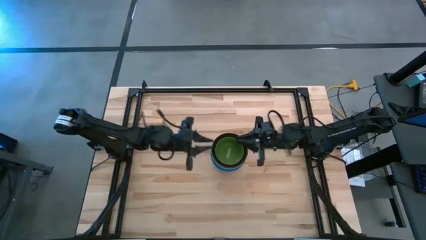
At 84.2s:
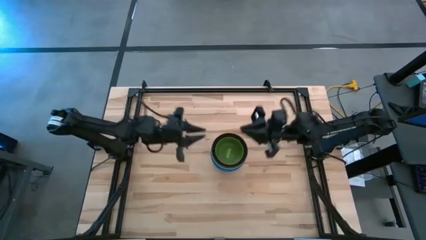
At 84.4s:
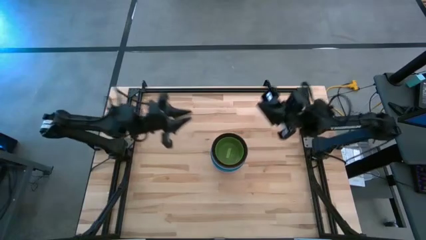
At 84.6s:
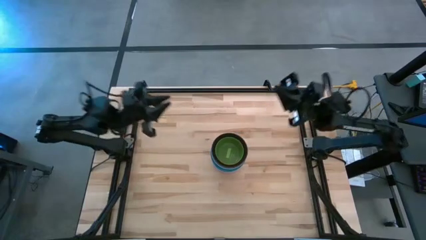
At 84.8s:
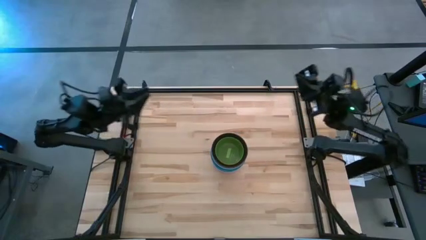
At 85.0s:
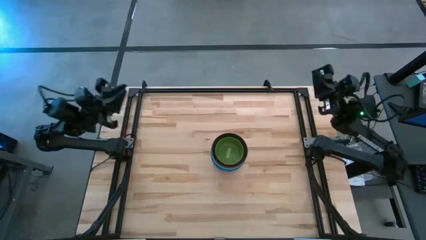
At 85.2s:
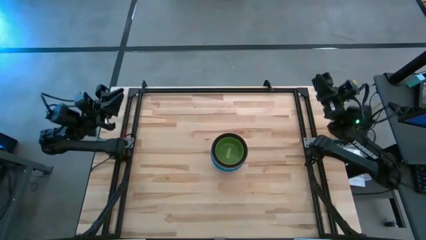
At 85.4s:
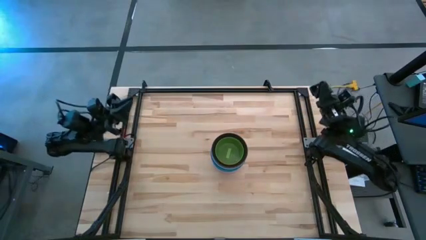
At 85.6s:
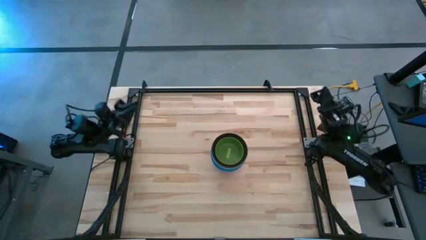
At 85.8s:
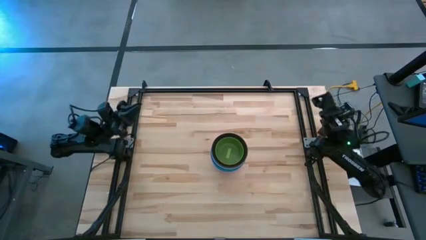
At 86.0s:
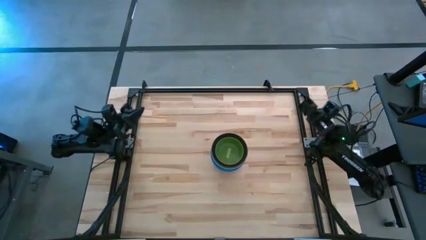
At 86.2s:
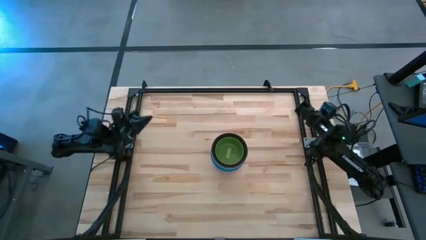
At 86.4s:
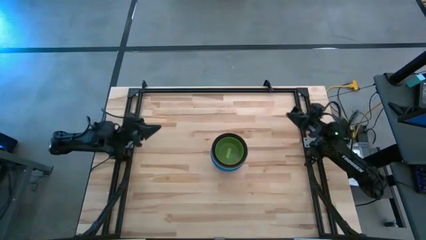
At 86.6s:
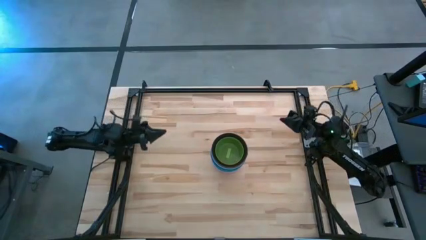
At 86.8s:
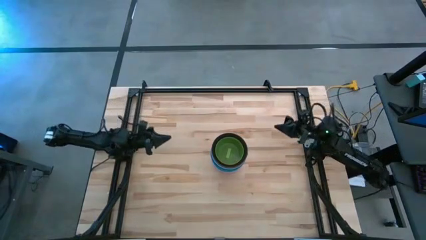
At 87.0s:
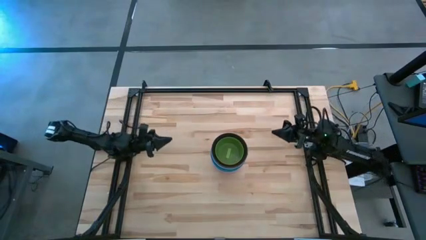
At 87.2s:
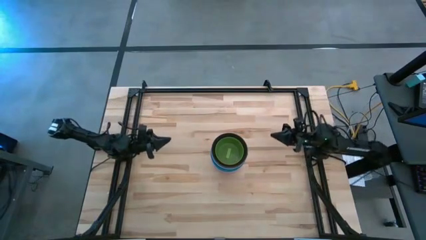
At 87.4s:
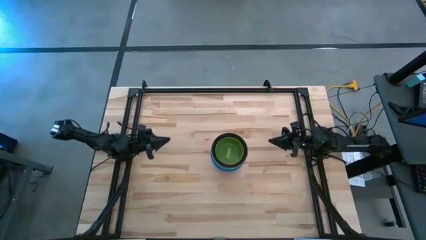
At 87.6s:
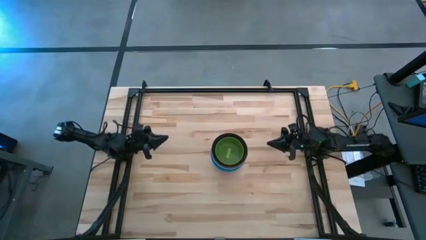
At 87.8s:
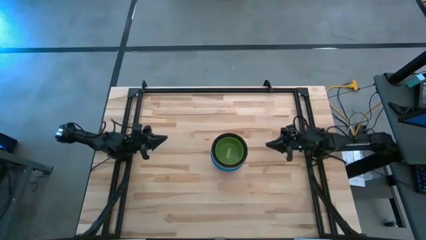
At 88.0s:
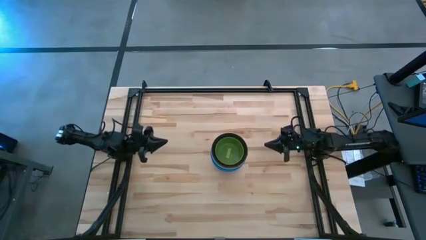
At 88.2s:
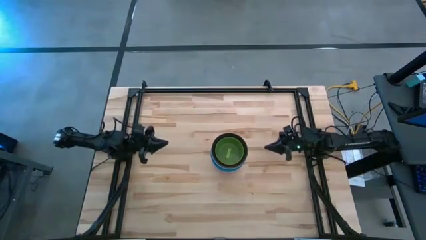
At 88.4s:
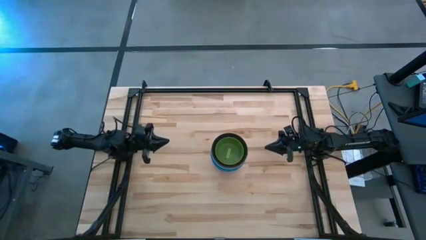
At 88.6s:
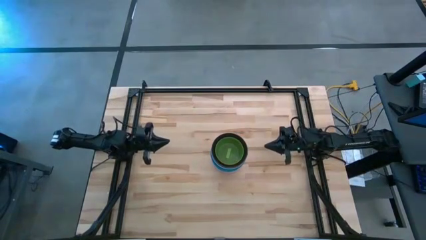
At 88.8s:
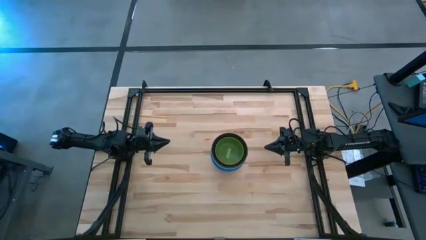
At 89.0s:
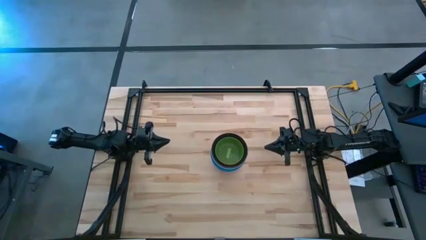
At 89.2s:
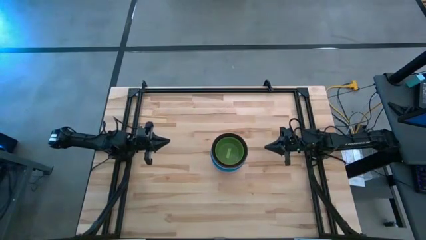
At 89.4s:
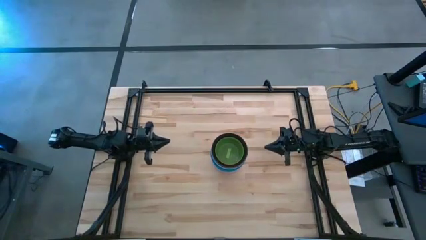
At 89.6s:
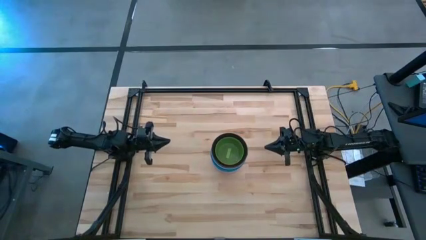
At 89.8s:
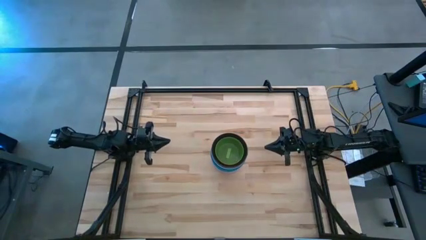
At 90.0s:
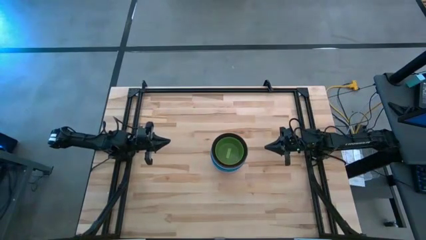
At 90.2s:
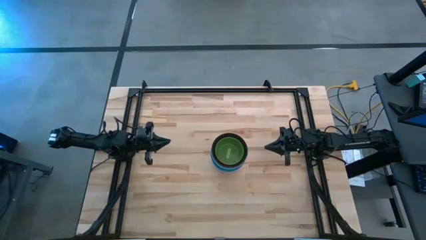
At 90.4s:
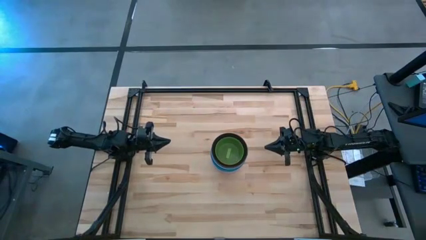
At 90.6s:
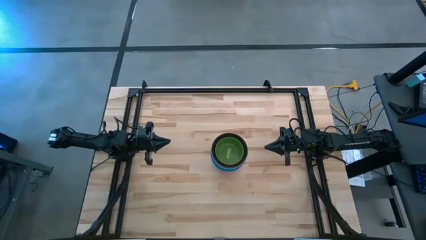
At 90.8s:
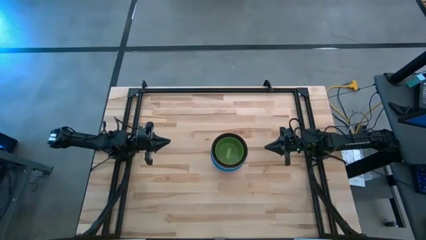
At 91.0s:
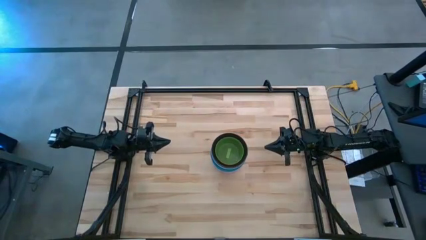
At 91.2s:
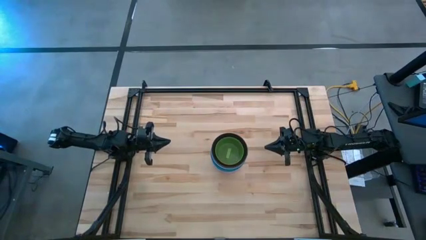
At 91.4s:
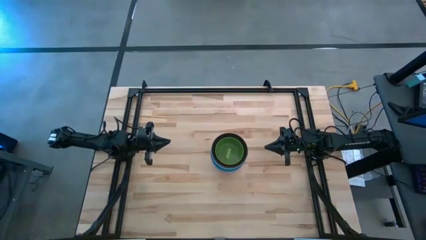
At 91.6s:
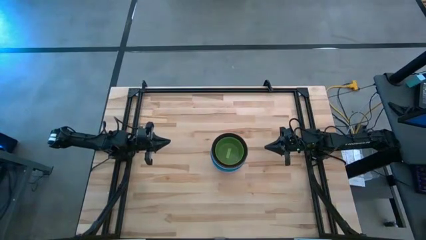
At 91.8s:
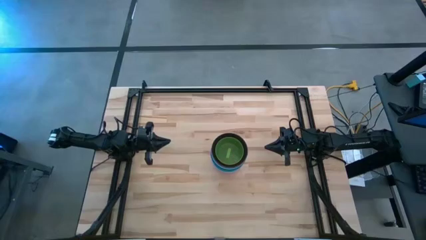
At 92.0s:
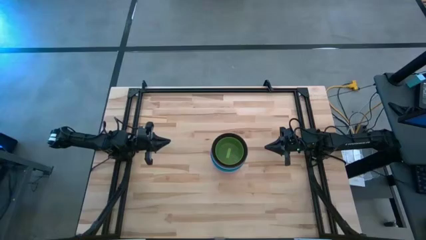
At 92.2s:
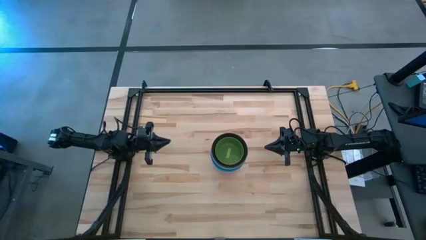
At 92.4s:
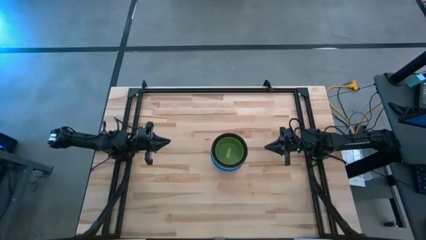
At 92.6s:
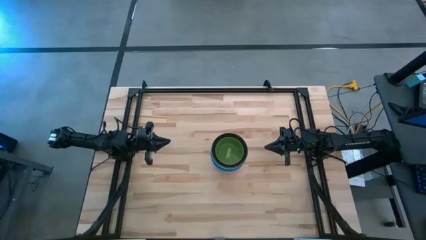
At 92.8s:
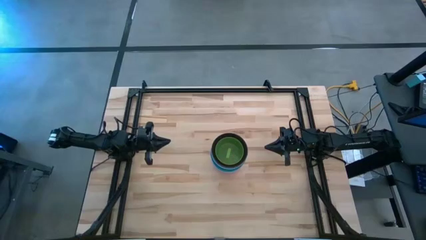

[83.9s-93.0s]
Task: Nest bowls inside each other
Return to Home Position

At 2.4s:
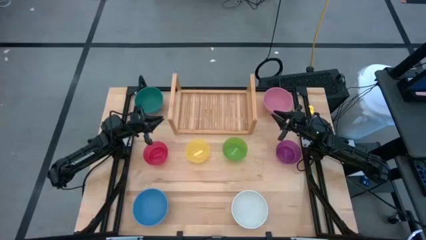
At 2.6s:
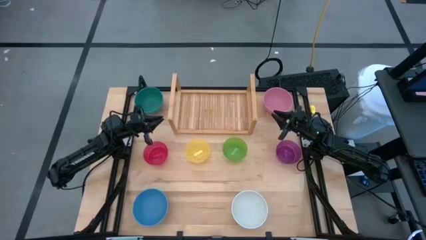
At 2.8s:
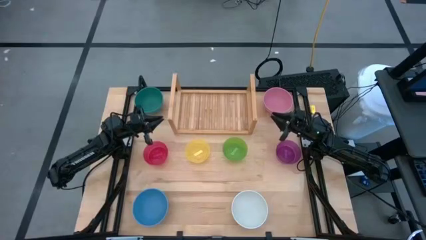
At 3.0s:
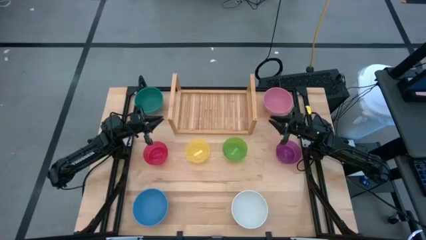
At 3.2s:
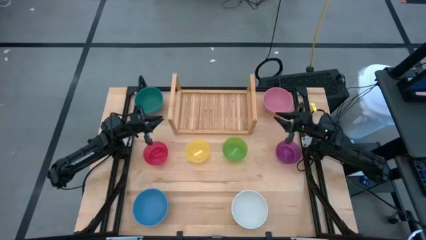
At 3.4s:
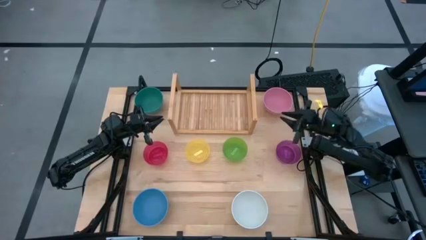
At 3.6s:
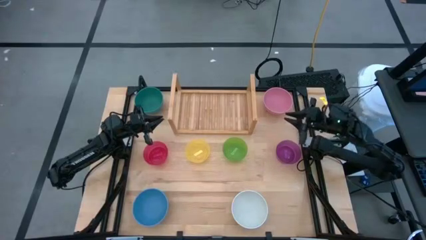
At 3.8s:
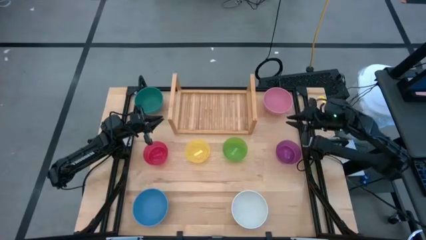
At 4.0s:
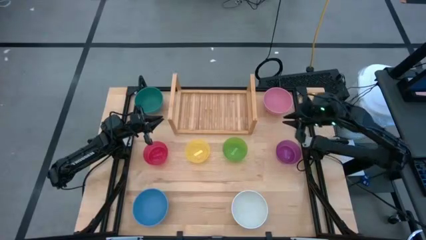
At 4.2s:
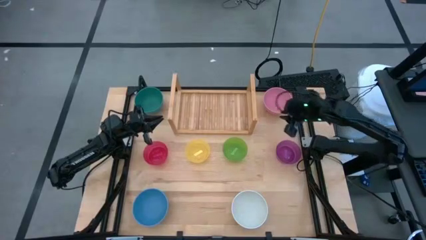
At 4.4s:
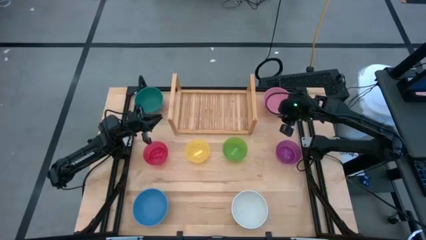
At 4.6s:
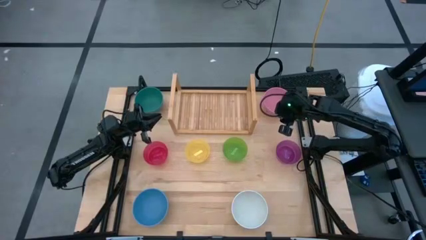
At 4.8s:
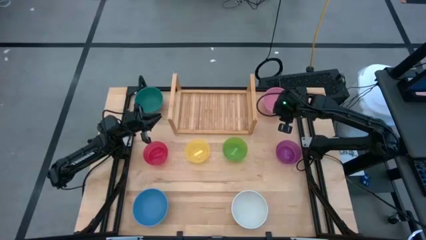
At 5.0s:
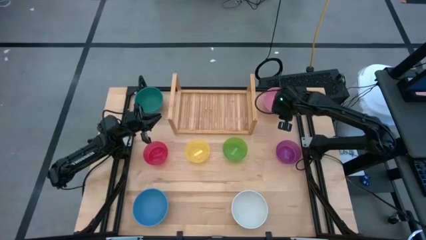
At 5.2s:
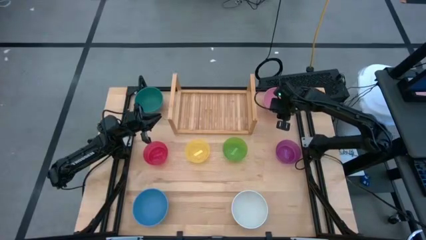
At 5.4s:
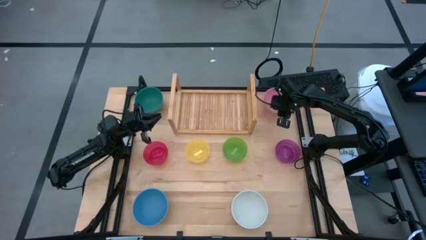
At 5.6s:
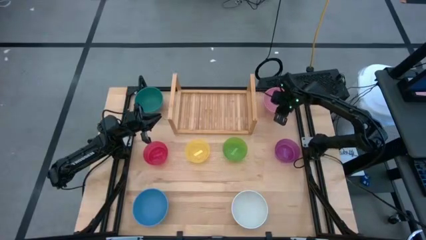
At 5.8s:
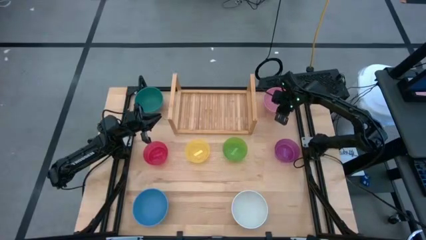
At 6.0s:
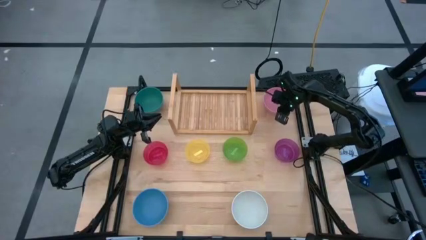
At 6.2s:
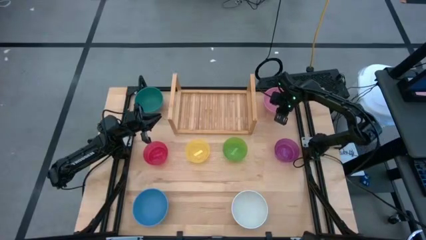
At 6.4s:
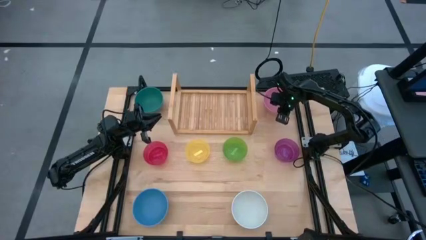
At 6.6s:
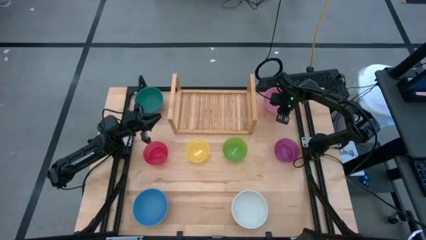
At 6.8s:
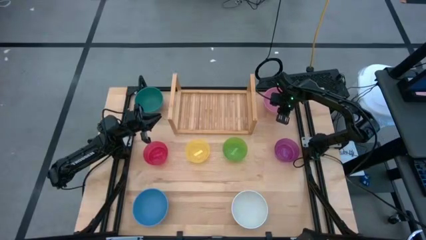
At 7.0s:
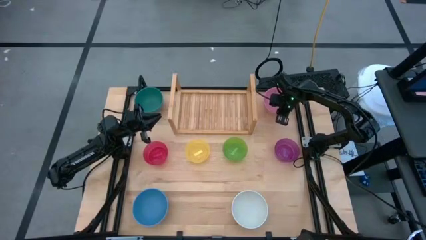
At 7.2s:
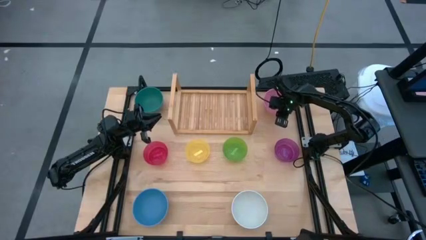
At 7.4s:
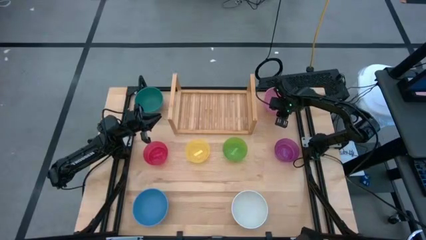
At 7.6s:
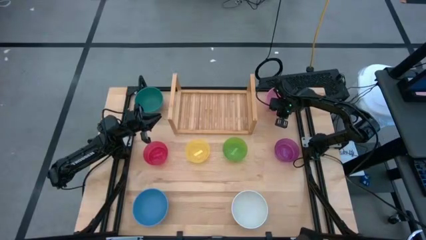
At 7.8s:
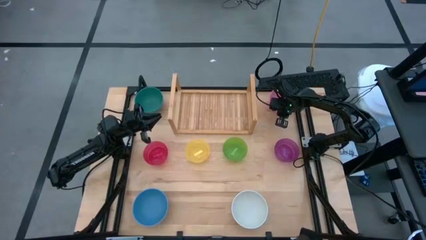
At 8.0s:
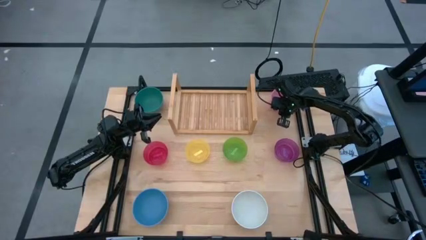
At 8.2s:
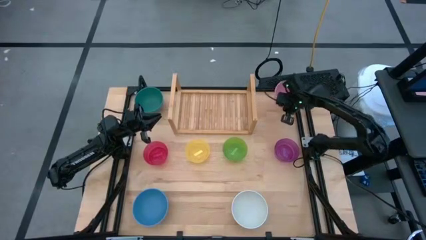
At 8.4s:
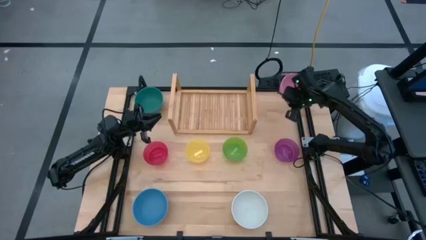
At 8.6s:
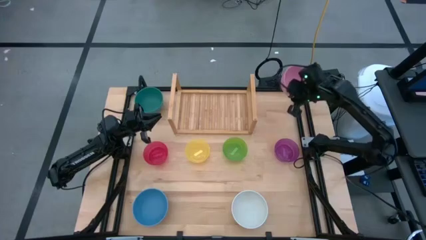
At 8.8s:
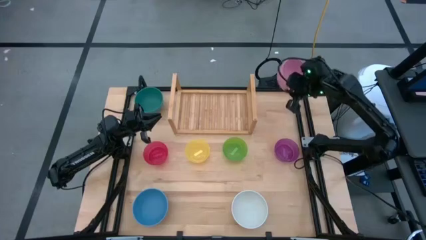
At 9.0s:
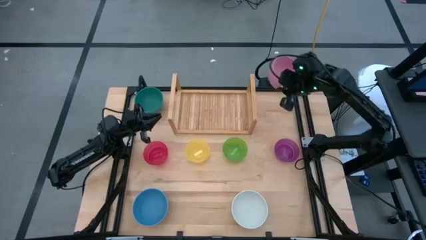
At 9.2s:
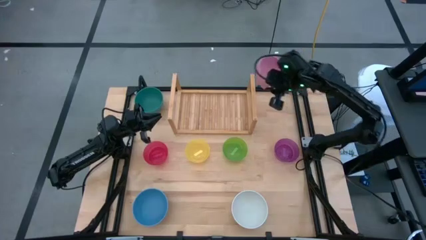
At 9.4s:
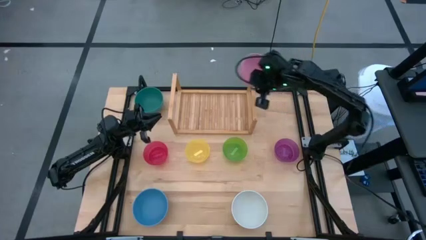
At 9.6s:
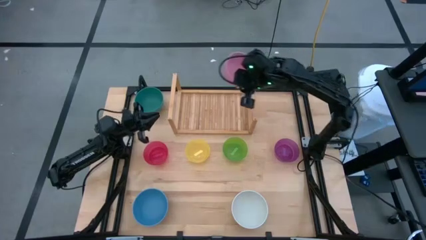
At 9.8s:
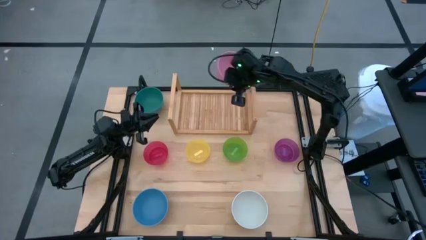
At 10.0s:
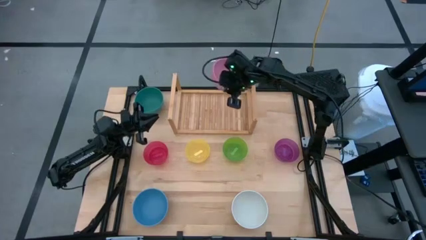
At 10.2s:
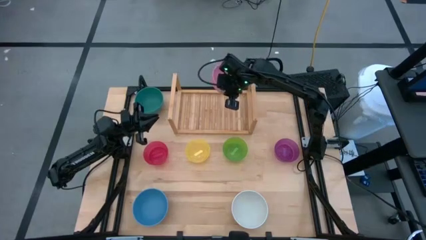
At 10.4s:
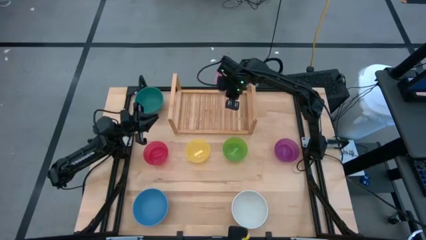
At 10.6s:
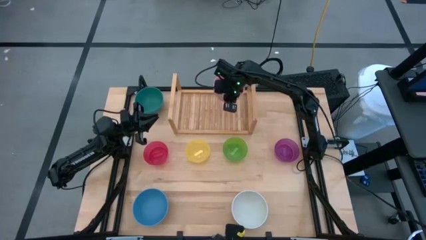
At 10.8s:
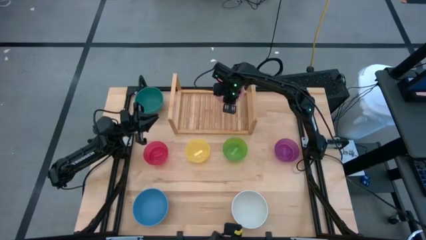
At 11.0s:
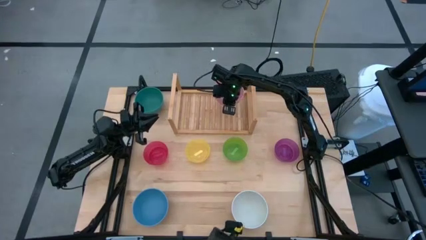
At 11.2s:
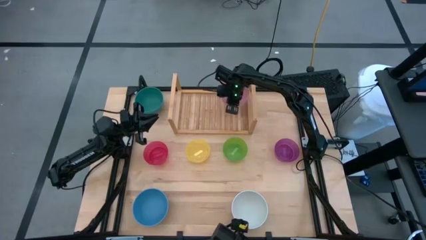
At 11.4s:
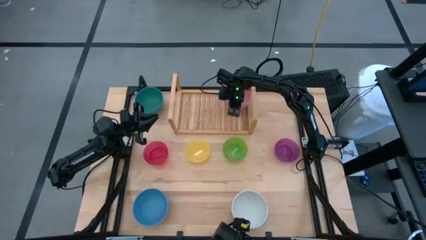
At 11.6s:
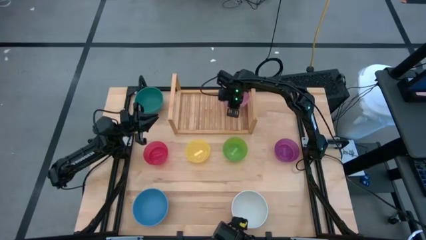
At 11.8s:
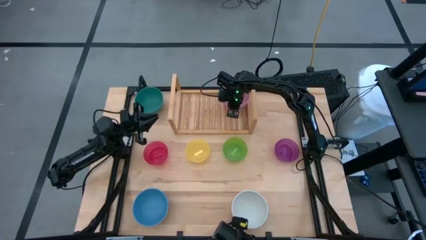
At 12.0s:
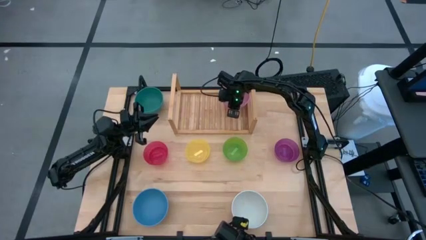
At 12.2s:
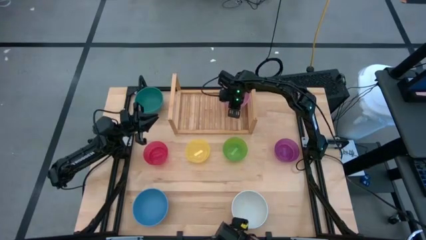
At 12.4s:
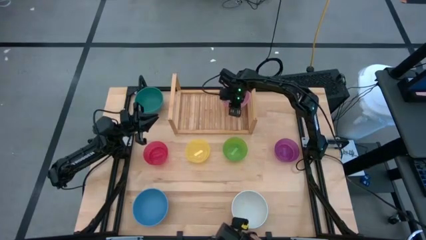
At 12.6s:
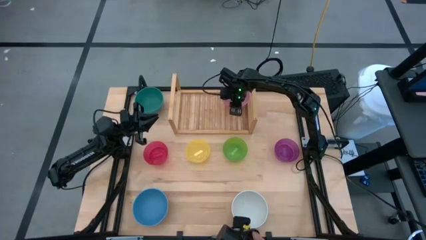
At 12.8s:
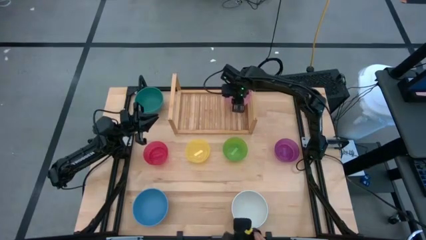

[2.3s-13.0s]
Task: Place and stack bowls onto a shelf
Put the pink bowl on the shelf
